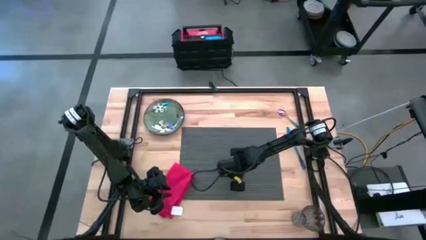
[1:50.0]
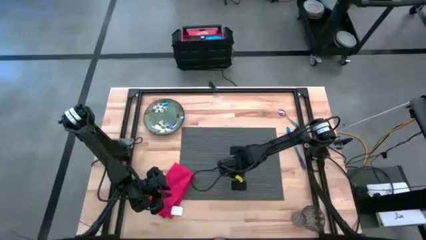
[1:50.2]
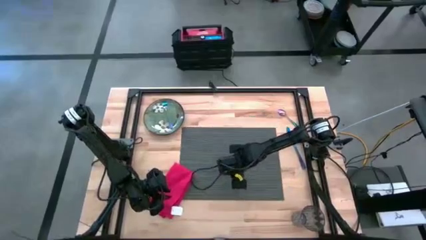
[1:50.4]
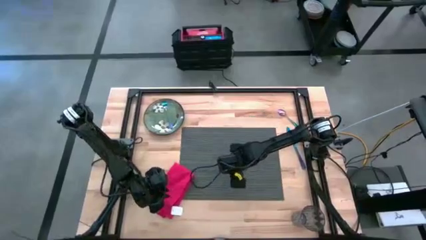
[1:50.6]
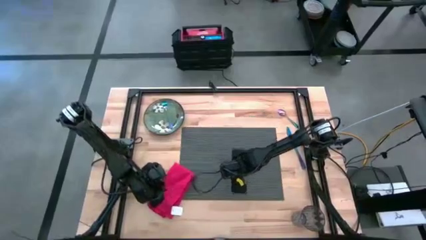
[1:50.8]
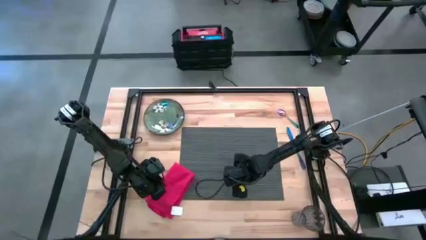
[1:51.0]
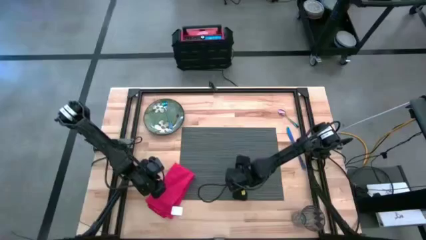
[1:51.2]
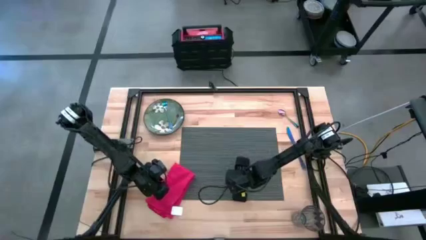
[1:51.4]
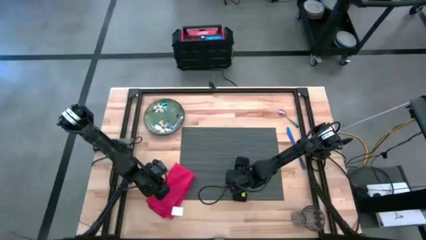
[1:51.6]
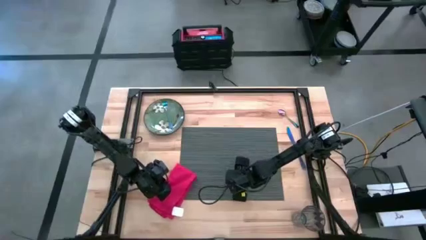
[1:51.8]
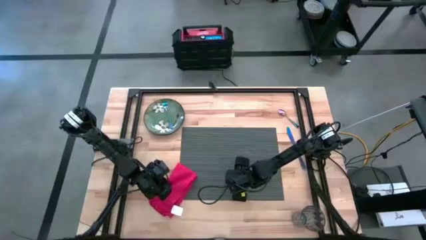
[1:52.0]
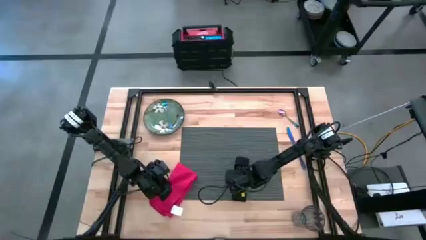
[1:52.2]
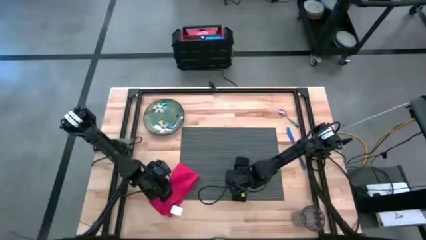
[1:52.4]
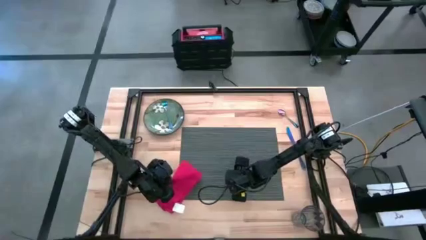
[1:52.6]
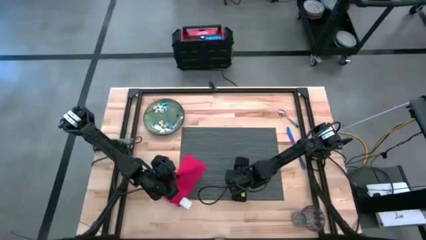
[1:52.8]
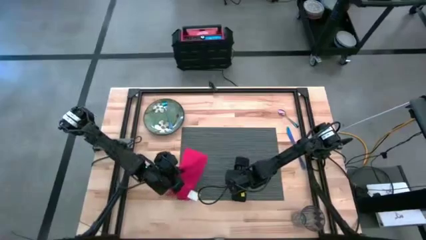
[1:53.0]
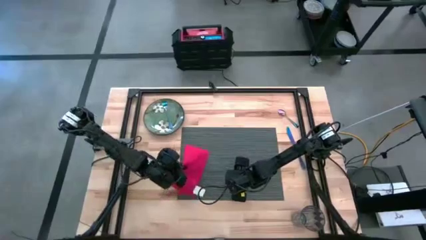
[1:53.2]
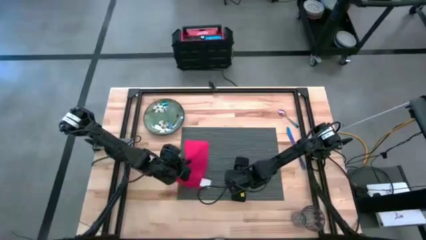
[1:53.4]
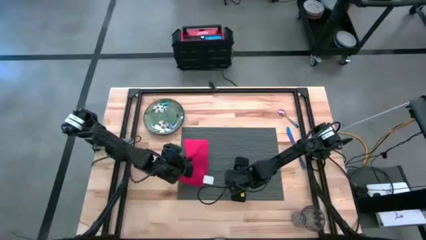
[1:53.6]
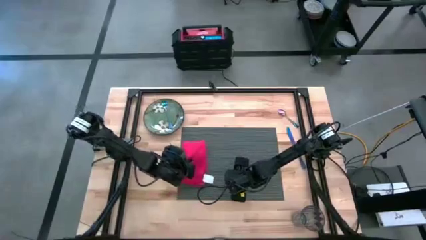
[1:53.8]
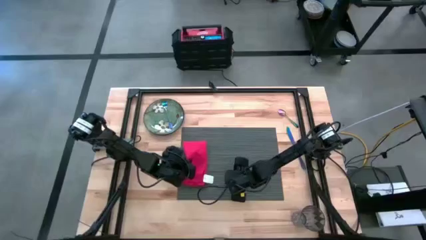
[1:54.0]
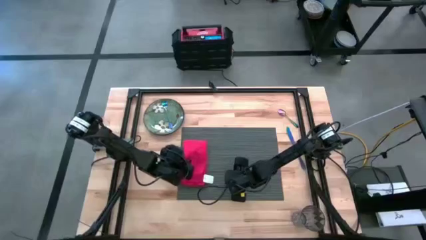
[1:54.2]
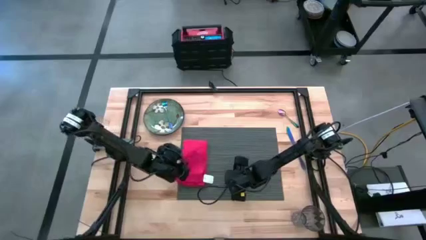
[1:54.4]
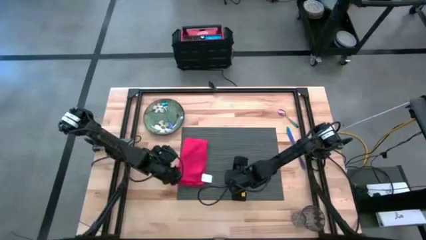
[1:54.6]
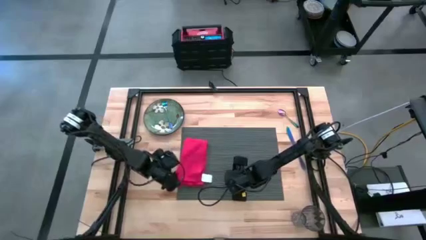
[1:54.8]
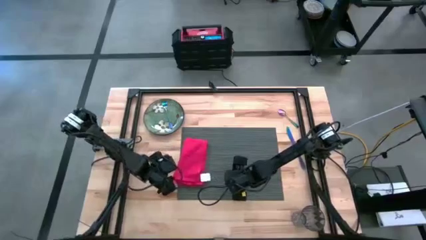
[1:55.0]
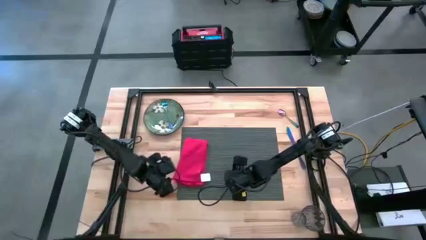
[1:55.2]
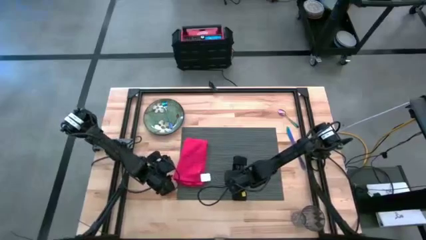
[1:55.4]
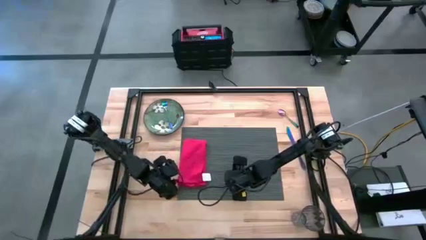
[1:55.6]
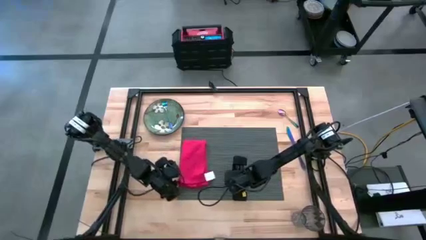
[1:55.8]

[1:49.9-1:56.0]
Task: Set table place
Put the red table napkin on the gray table mat

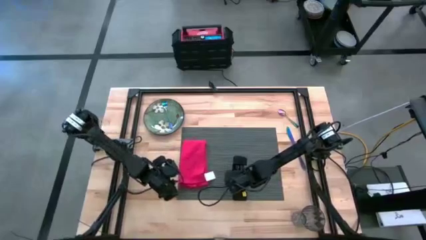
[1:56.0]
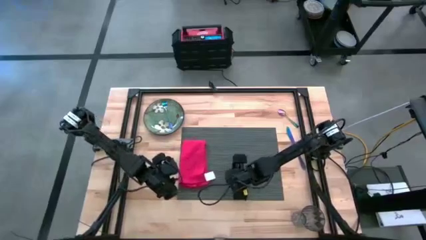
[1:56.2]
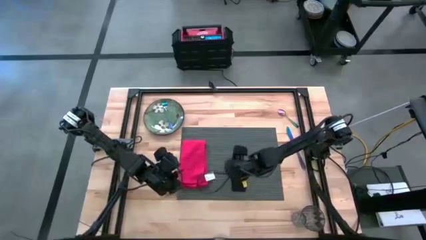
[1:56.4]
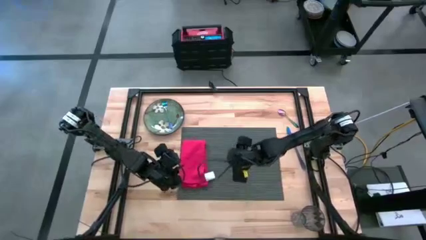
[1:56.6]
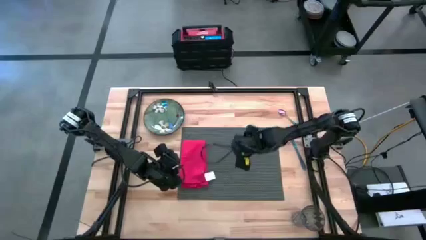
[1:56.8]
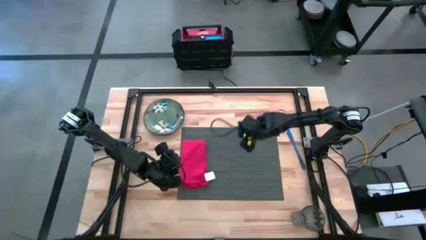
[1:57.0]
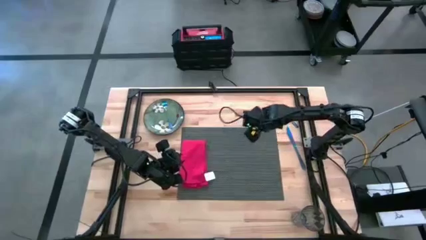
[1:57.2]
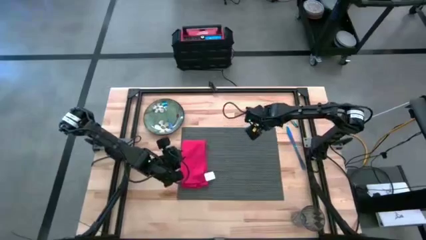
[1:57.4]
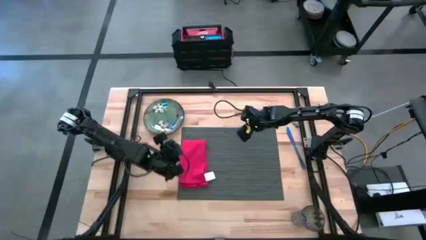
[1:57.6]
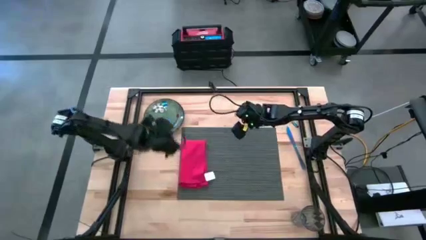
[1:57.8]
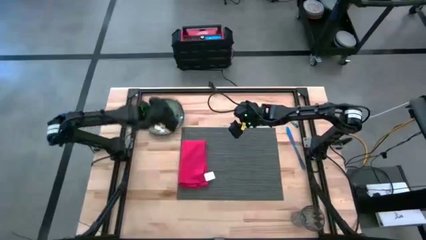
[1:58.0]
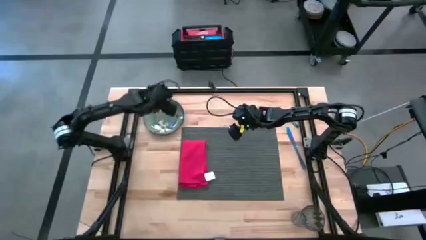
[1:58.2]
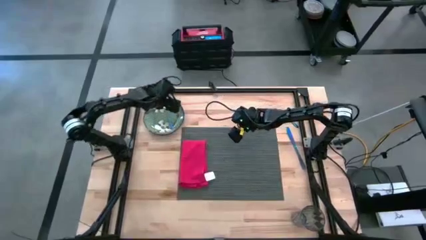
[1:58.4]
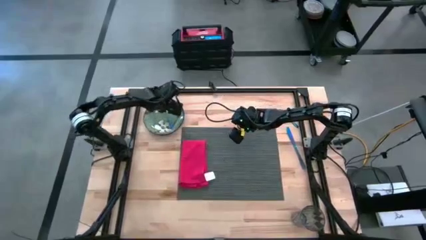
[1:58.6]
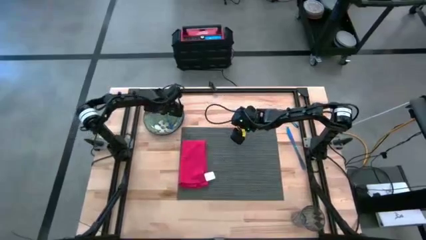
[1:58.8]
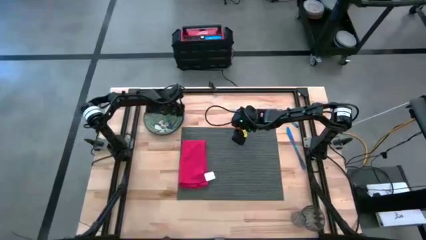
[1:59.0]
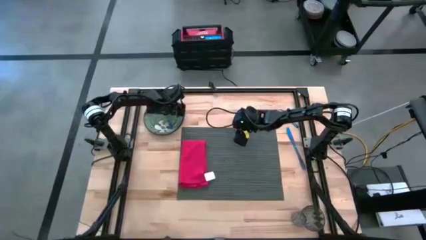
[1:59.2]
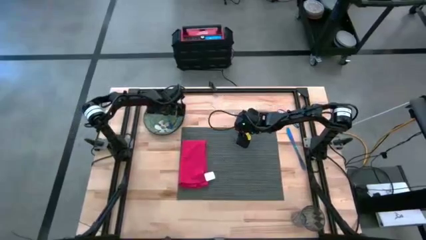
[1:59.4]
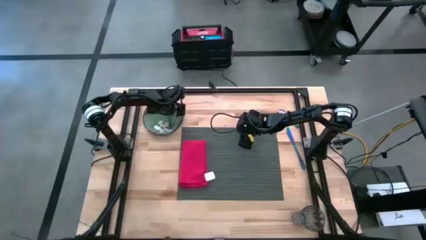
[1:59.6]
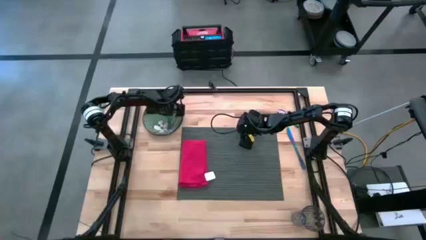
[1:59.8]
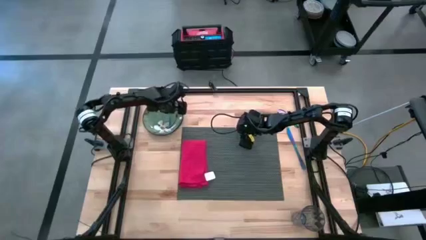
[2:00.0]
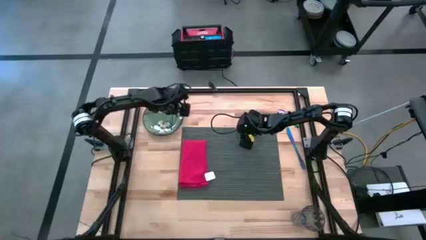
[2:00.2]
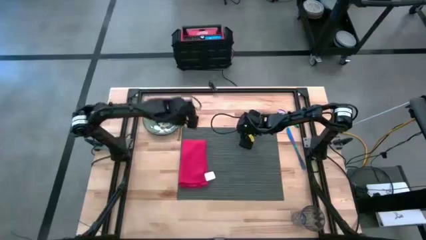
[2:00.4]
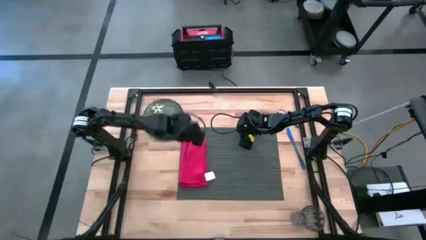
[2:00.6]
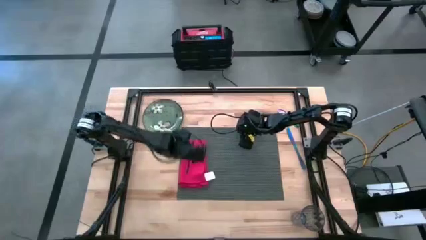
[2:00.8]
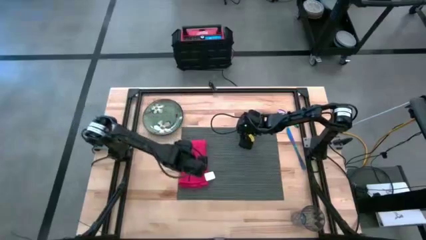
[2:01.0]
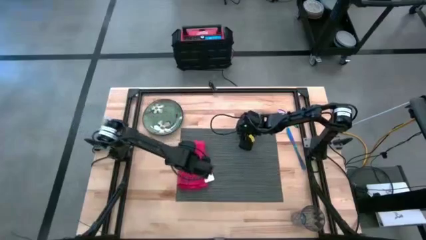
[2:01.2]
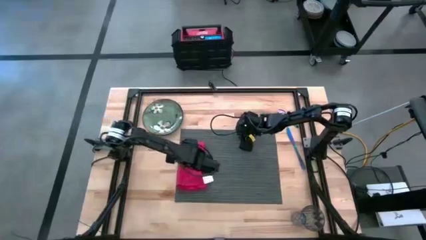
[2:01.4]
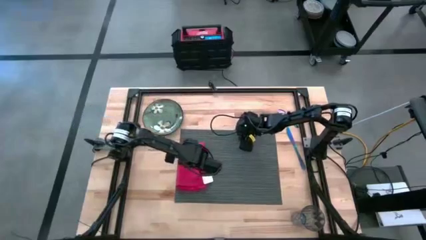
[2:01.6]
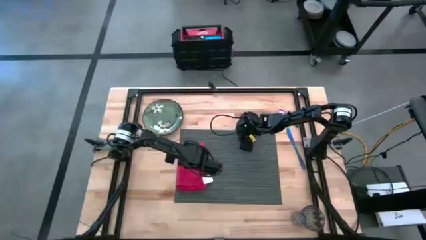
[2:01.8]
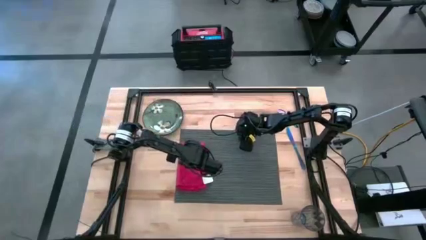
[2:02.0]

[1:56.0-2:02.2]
Put the blue fork on top of the red table napkin on the gray table mat

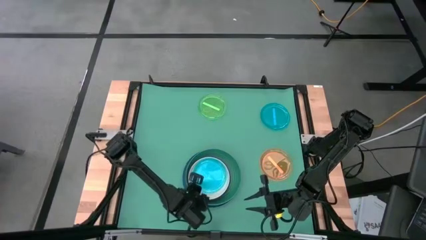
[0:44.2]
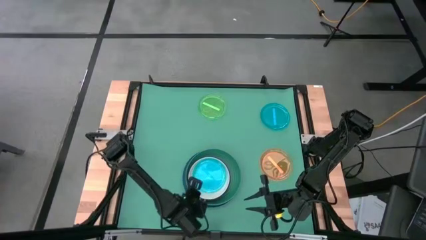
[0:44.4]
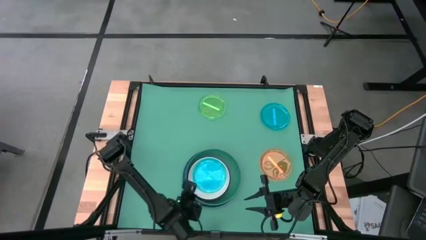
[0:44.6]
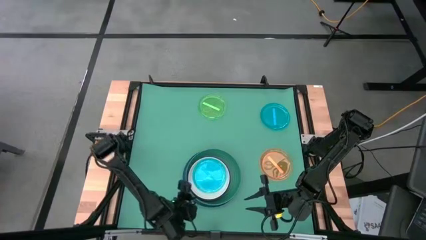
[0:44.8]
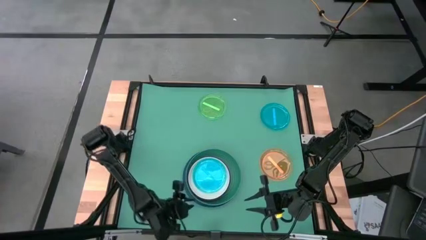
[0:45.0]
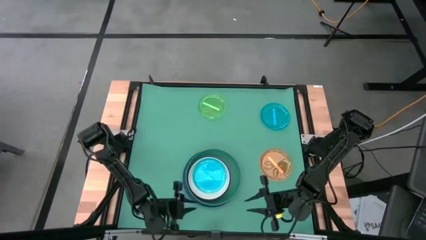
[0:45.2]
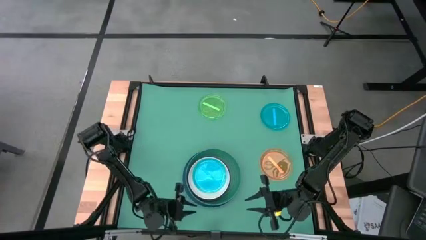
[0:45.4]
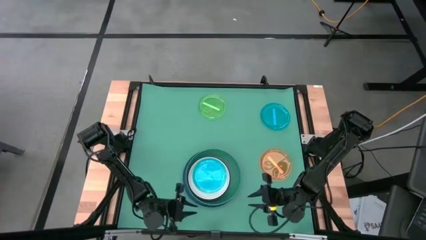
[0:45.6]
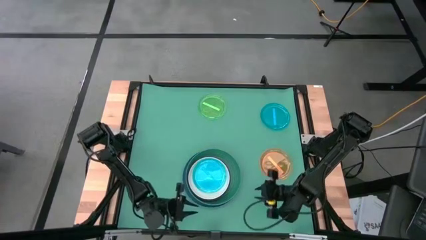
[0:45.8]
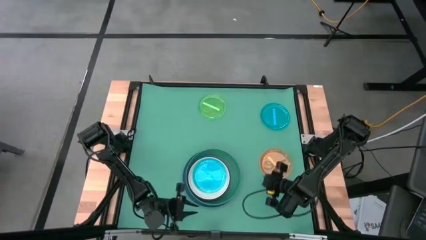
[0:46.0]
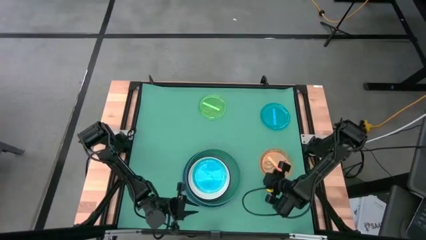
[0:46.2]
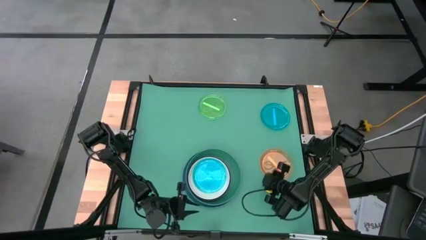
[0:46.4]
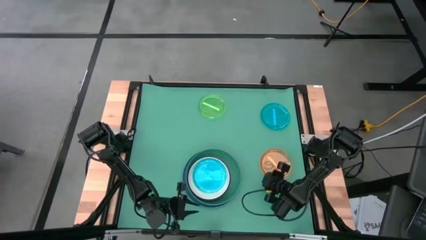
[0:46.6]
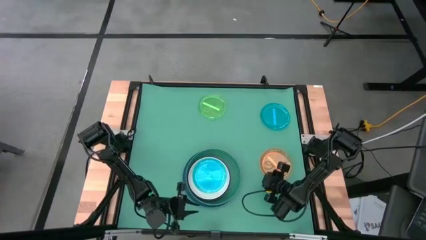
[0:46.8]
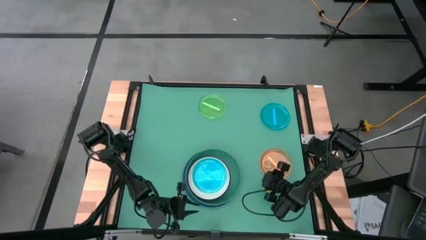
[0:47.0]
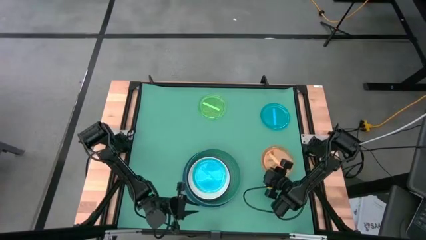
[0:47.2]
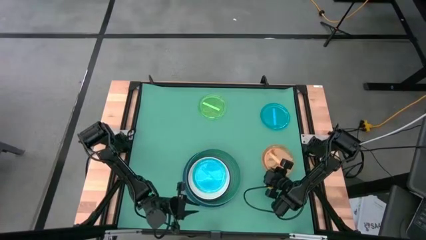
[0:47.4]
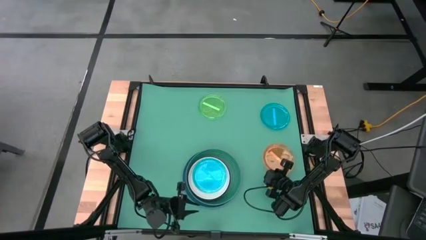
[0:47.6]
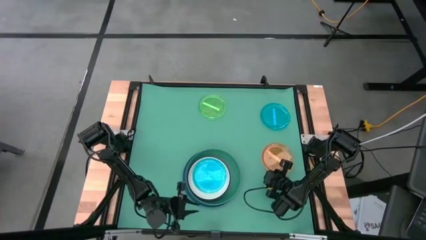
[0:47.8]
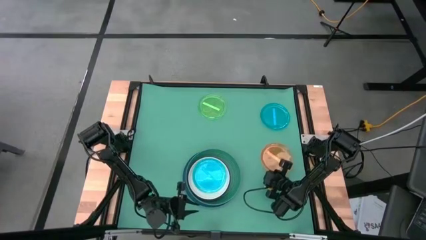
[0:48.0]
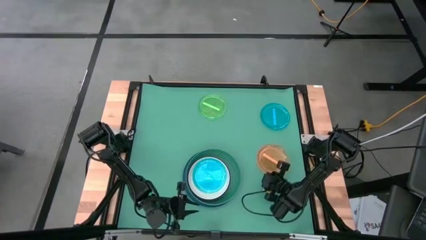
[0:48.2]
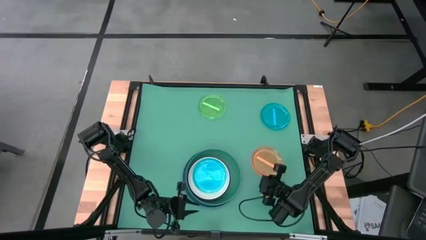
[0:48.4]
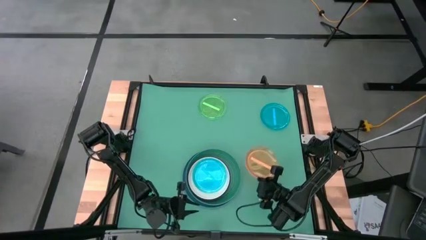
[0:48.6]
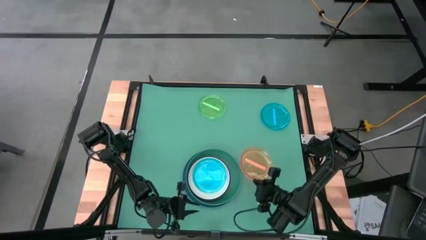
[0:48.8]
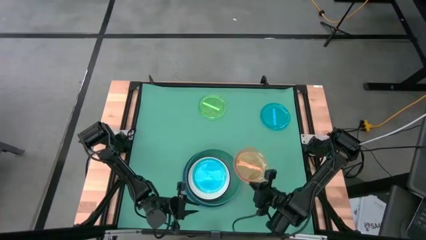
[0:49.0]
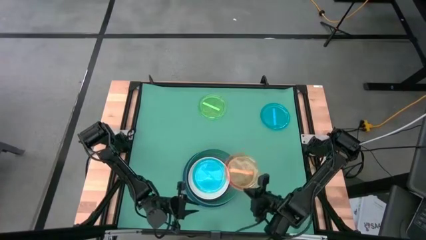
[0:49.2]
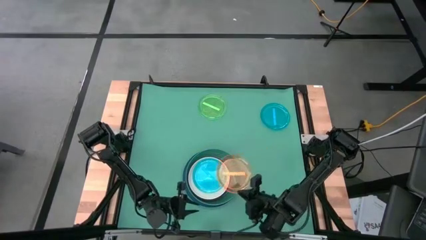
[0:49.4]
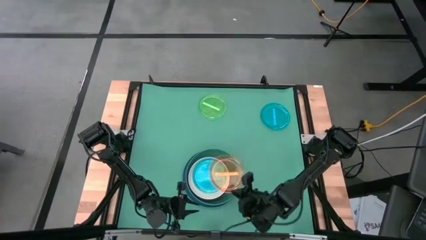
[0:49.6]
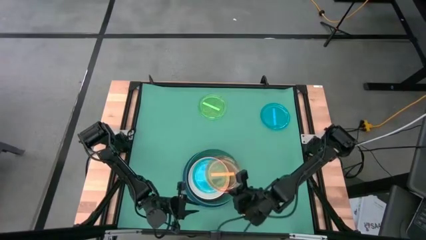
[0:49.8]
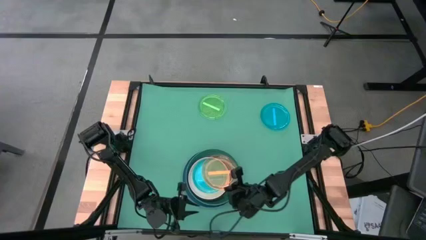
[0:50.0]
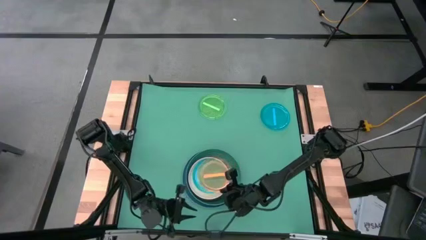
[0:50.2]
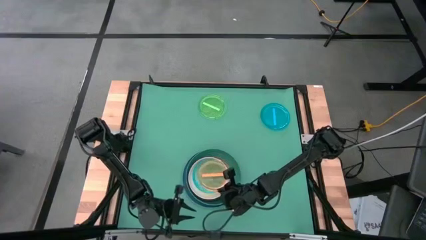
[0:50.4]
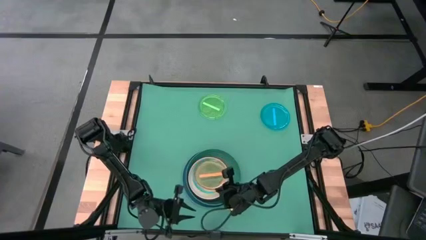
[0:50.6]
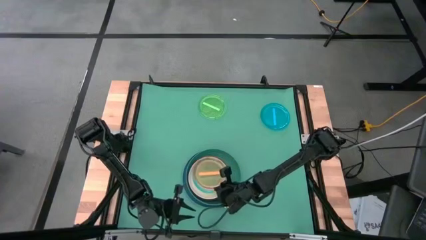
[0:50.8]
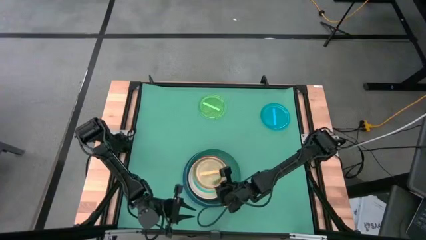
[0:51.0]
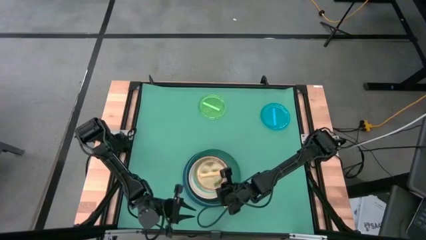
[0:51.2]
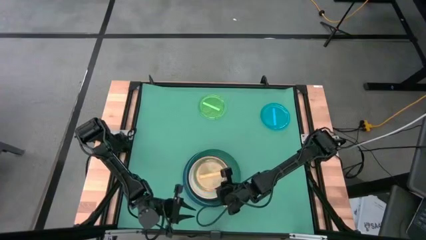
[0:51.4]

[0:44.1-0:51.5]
Task: Stack plastic plates
Stack the orange transparent plate on top of the blue transparent plate
